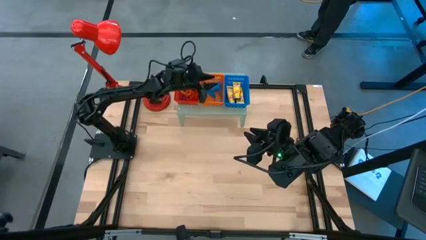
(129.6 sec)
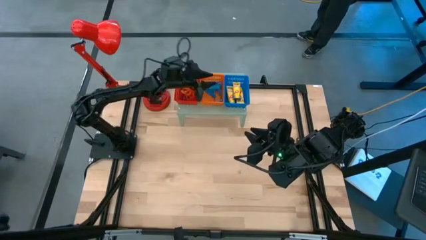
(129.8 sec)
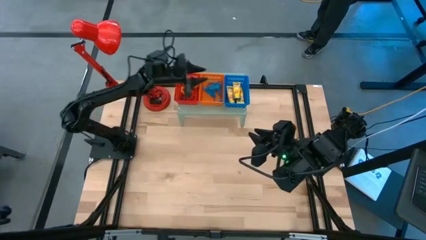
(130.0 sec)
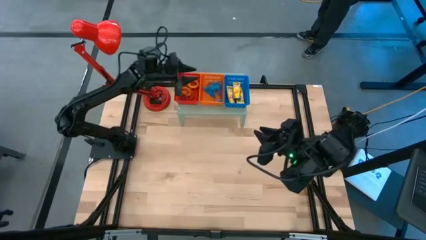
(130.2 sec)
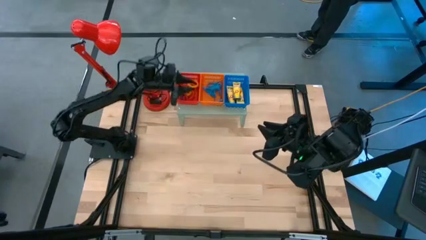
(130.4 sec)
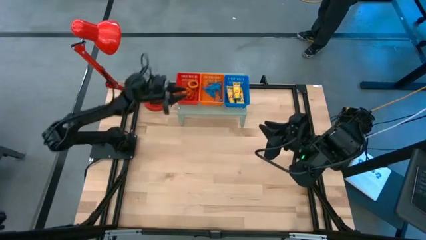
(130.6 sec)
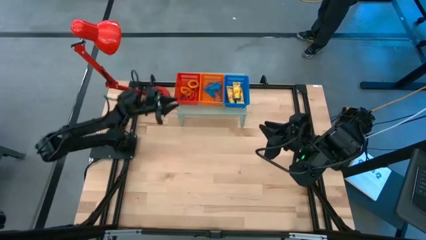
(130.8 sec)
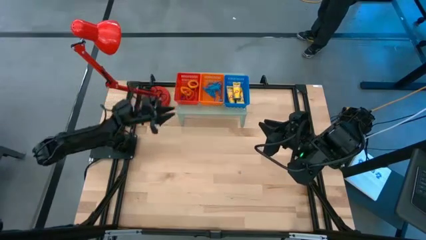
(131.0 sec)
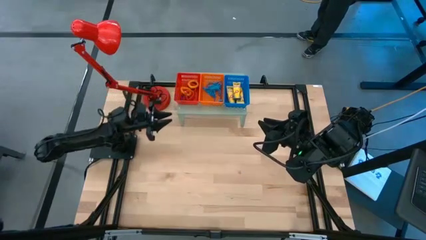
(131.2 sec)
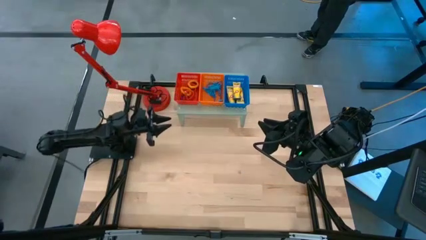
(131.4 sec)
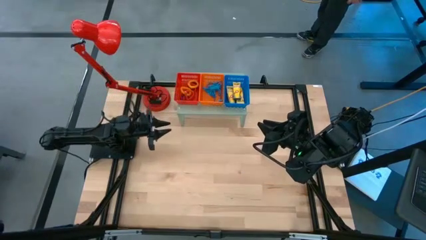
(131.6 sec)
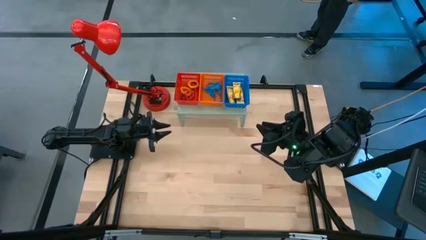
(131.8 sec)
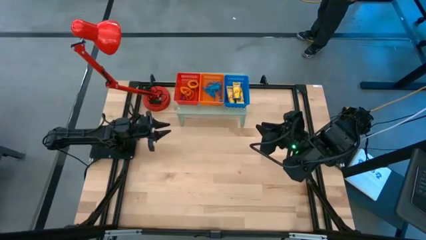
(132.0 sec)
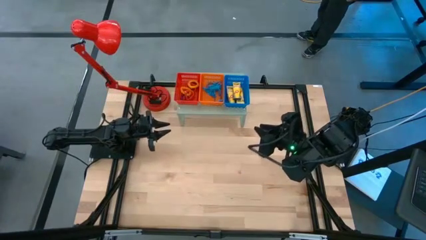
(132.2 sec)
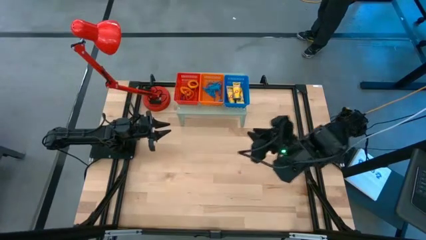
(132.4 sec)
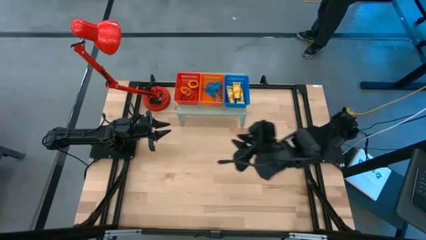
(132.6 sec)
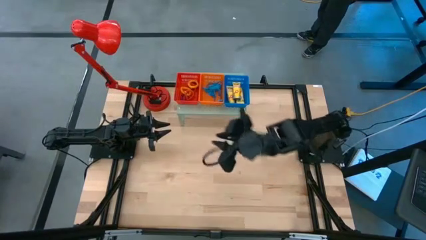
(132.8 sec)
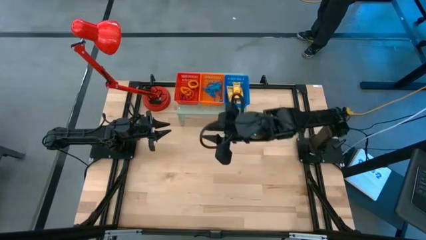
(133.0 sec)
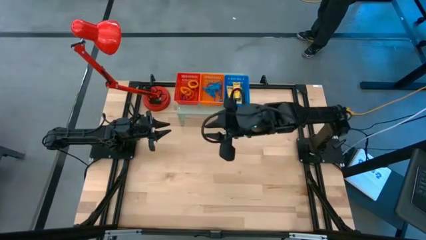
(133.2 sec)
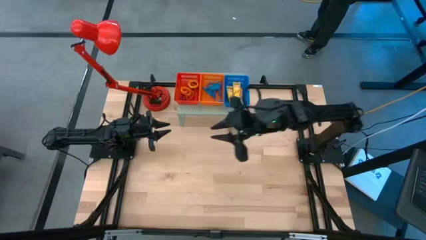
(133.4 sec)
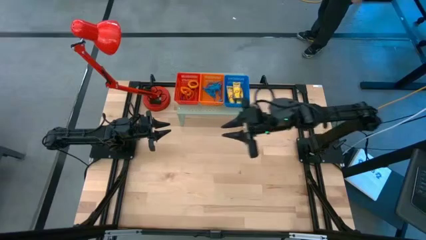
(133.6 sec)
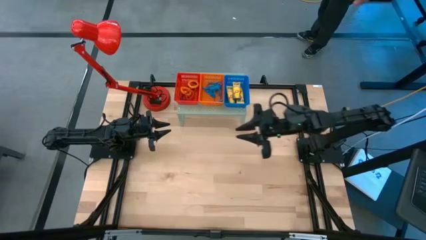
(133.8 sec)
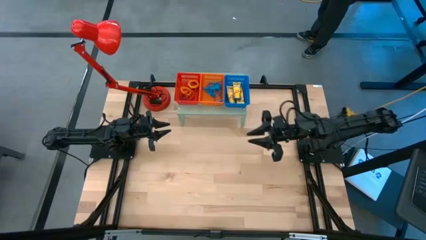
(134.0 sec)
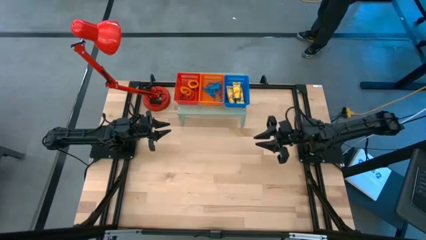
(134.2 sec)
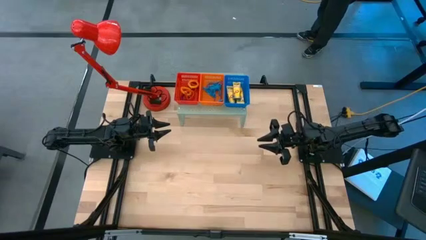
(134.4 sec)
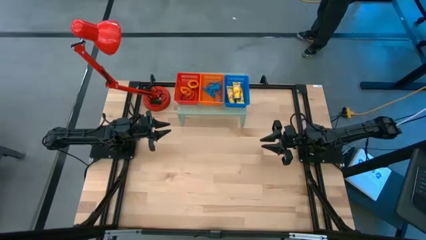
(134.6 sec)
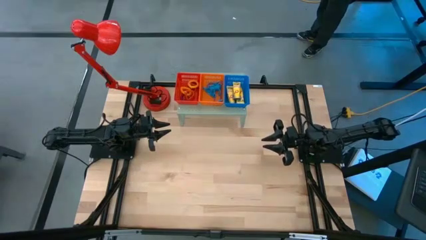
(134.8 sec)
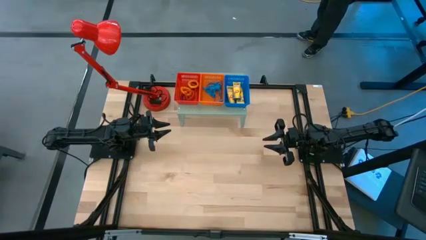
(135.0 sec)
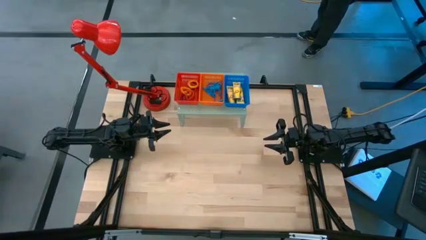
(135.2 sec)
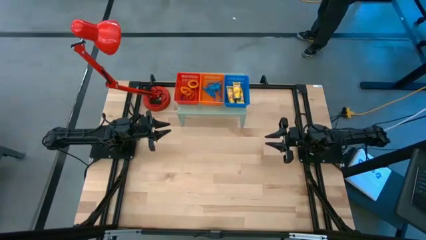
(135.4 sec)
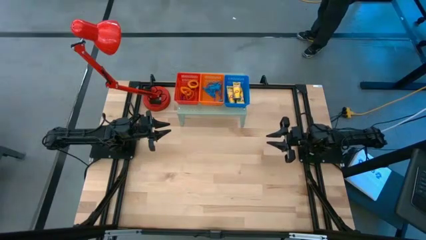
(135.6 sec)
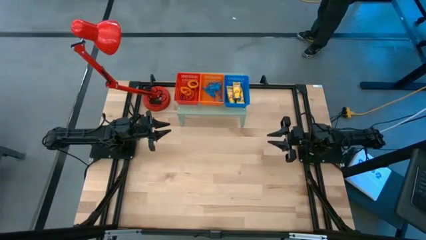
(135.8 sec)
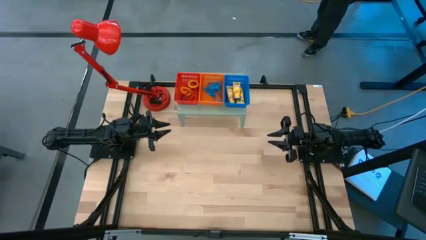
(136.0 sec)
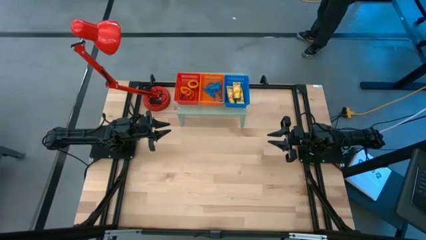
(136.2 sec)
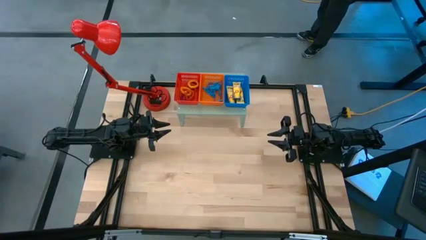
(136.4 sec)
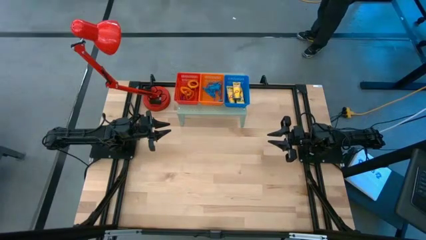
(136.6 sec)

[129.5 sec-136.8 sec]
Task: Pick & Place Office Desk Supplies
Return to Home Position

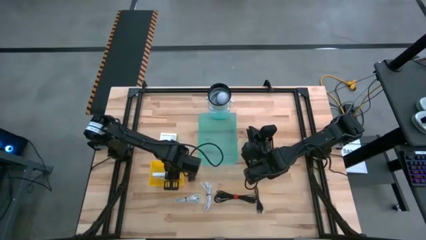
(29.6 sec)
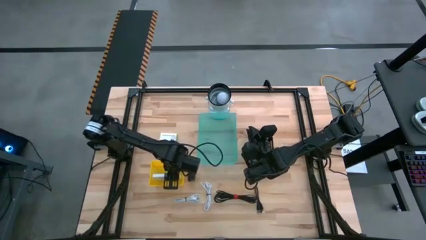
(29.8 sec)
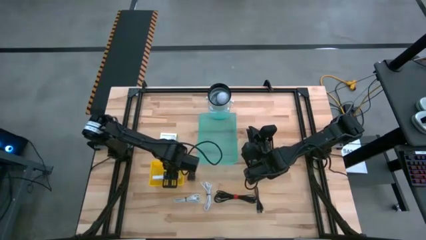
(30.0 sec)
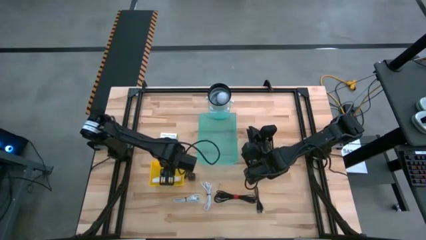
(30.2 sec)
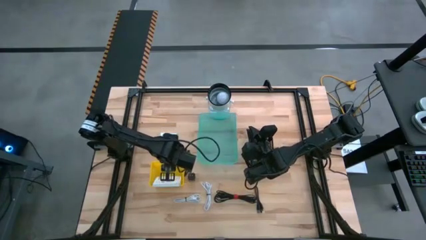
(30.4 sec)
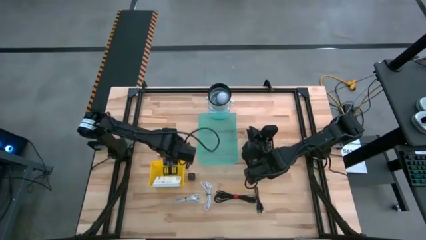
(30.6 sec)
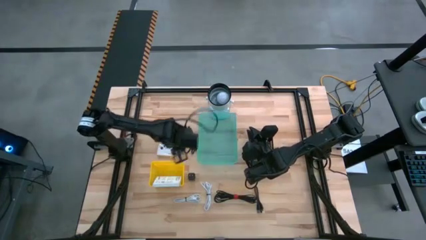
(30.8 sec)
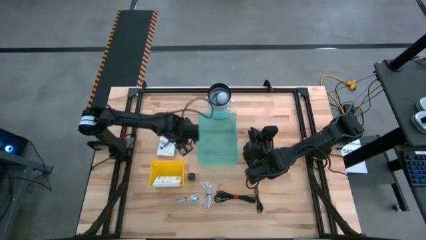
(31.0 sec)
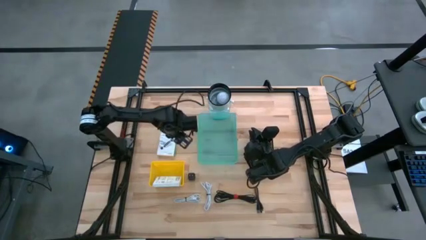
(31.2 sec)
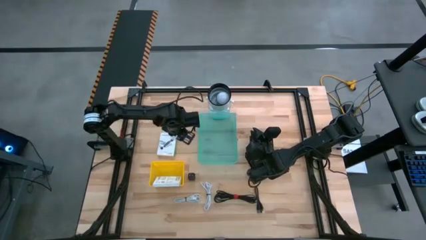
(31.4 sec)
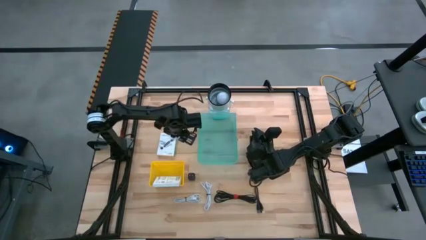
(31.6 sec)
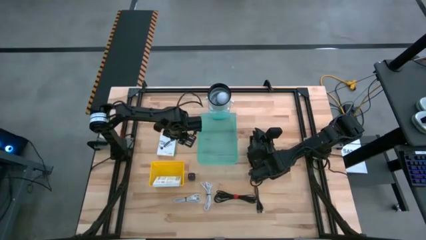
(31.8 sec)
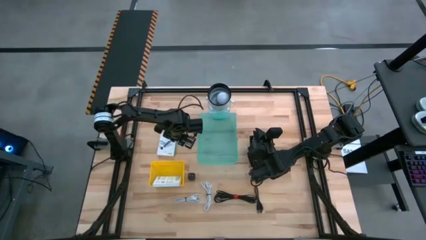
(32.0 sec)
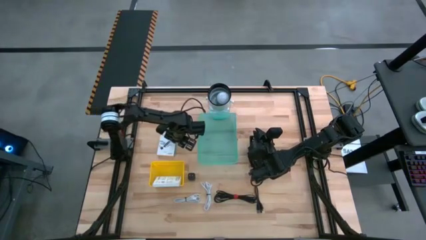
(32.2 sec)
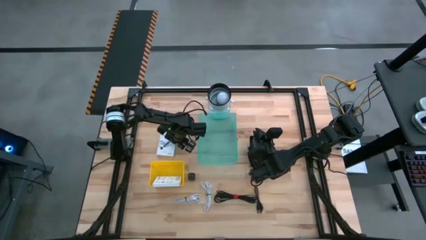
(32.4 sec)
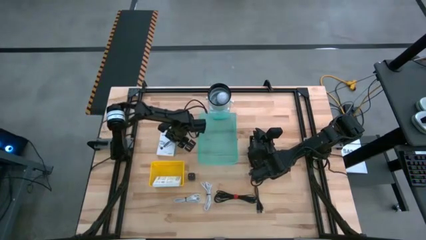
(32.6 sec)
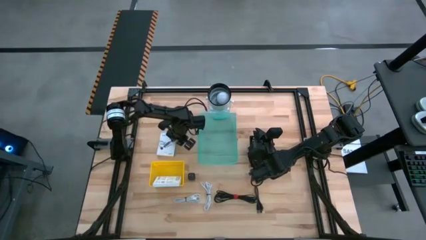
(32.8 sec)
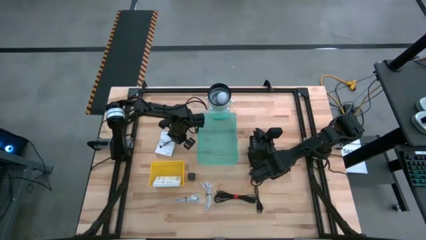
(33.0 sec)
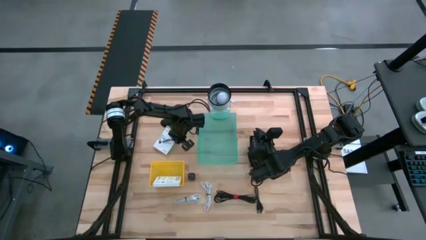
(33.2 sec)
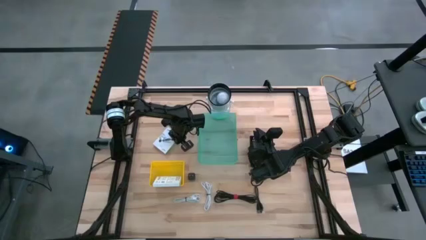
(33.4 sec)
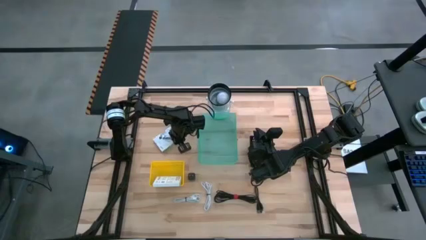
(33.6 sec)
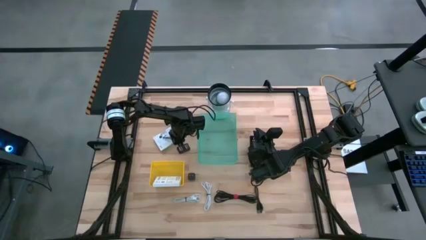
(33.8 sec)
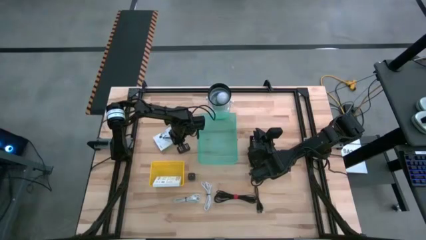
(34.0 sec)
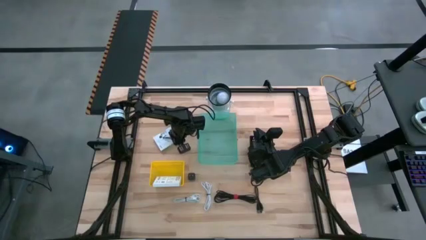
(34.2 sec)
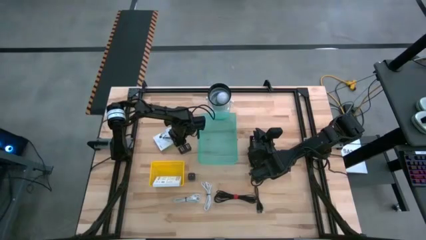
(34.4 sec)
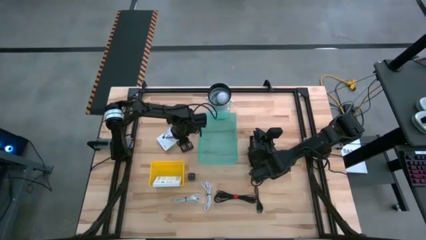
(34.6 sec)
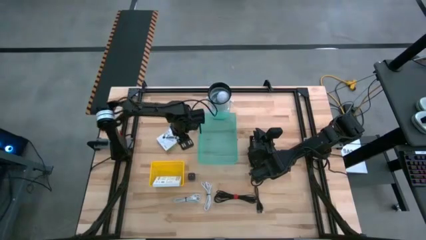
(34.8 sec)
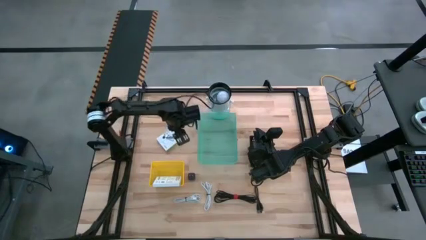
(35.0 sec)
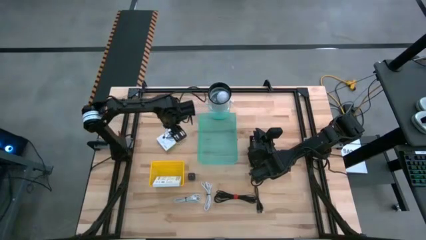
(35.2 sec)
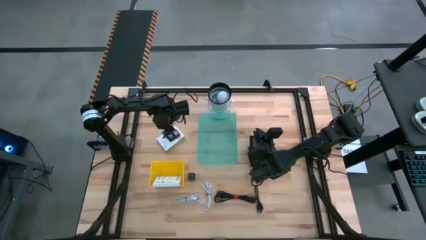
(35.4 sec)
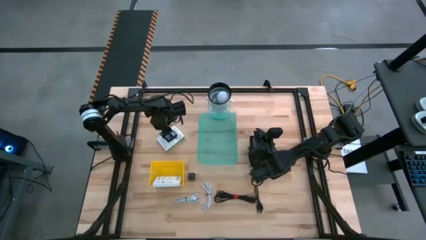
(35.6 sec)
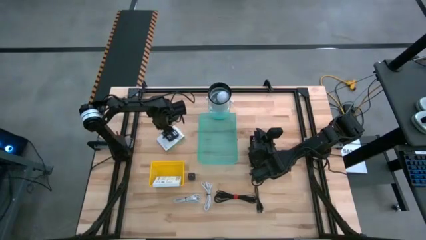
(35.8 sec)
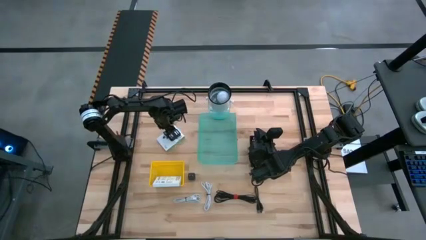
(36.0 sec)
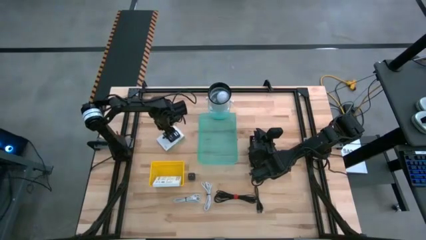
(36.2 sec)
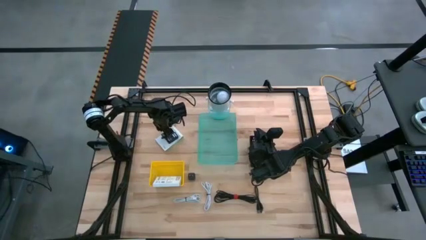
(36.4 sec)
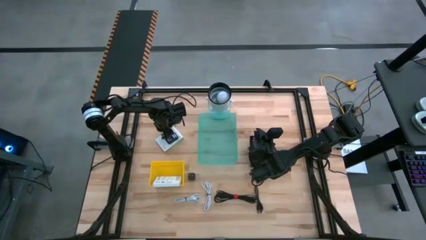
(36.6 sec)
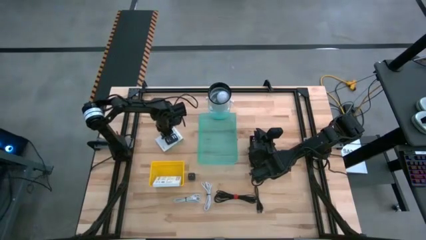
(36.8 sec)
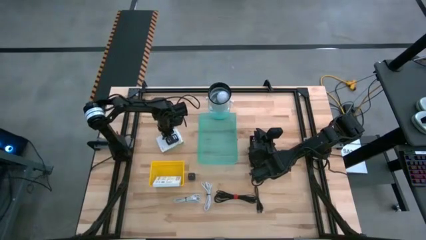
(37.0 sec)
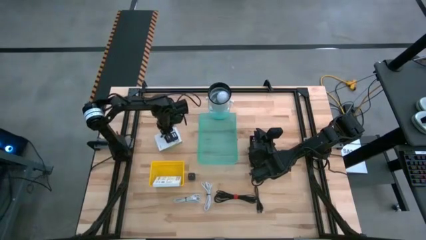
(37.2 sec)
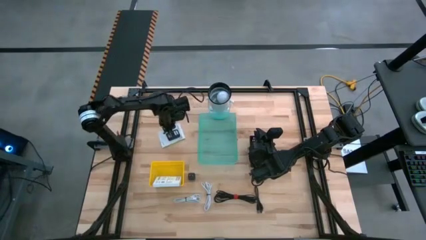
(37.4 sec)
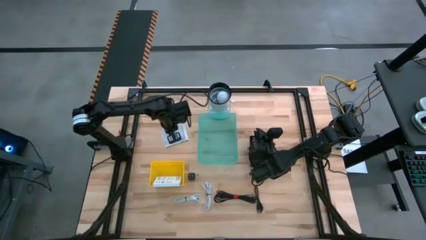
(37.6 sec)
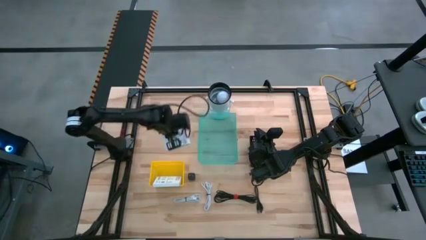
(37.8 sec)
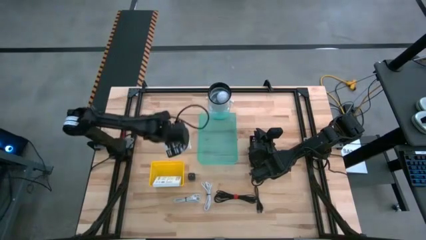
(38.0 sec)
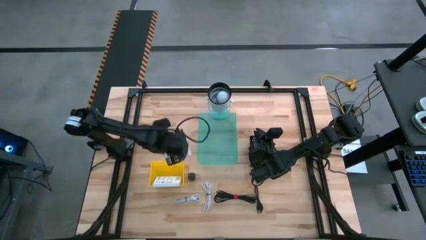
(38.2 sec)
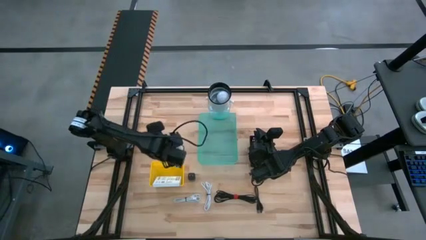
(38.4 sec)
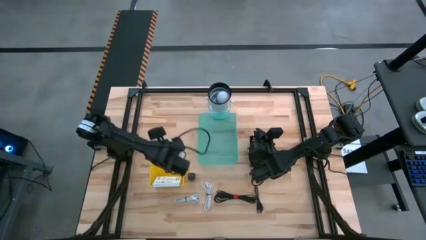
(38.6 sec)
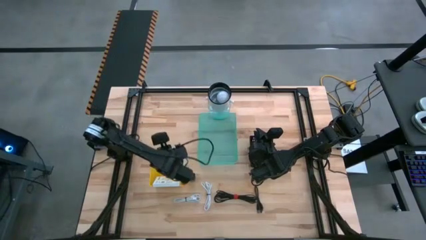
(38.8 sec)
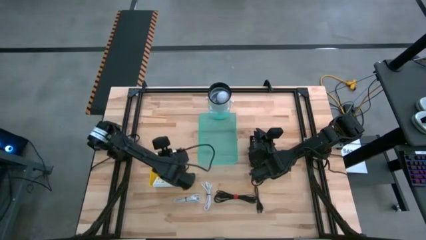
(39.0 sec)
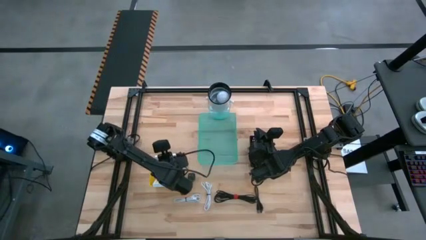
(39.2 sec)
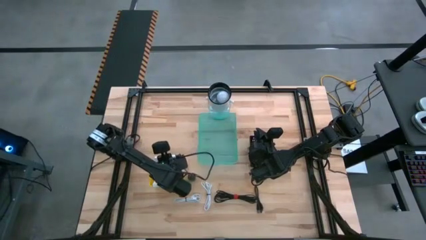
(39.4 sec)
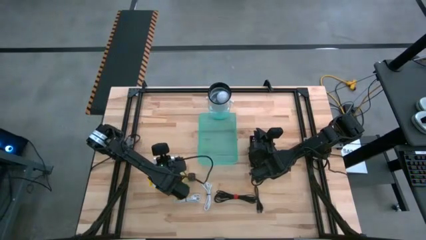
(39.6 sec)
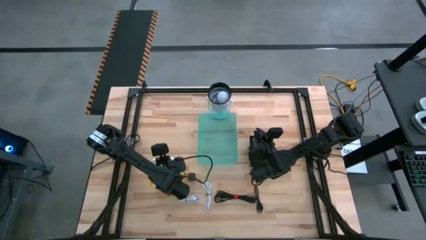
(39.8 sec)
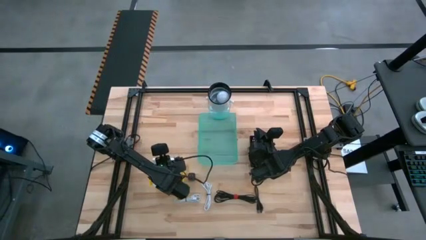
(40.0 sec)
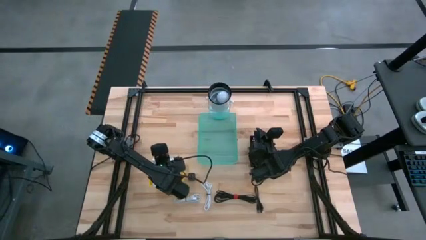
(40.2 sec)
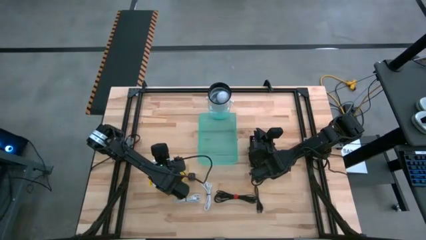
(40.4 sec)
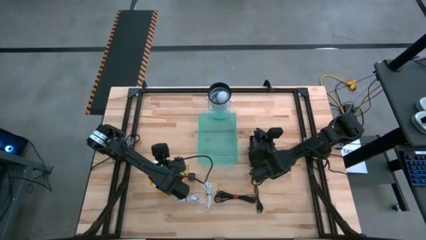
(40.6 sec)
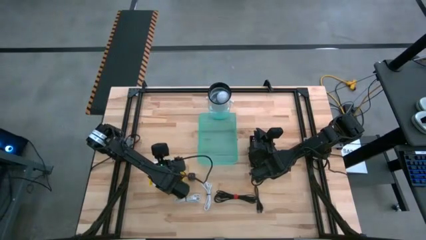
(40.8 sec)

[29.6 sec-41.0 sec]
Task: Pick and place items into bin
Put the card reader box into the yellow bin
